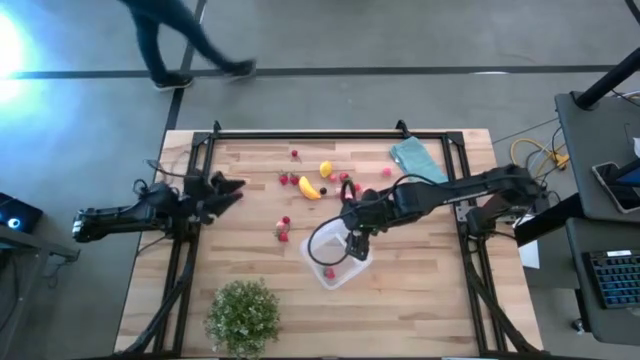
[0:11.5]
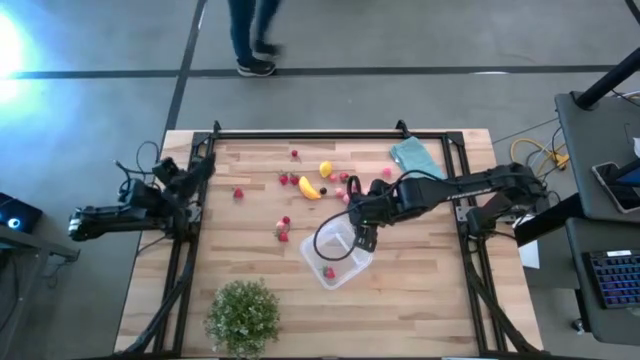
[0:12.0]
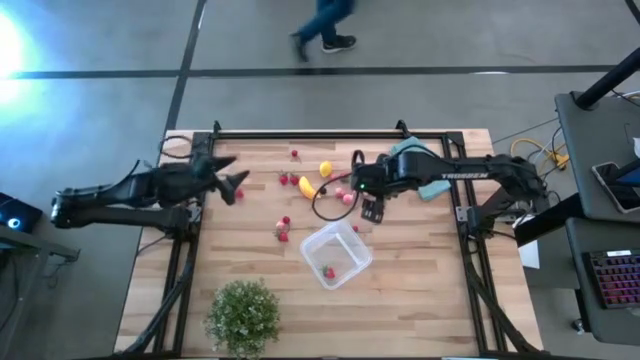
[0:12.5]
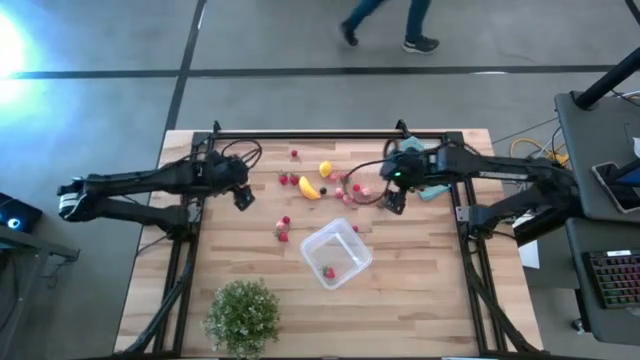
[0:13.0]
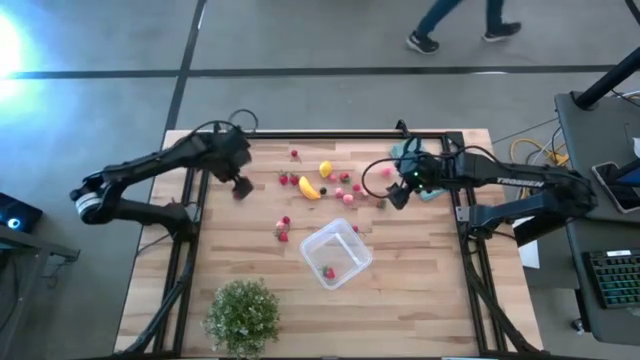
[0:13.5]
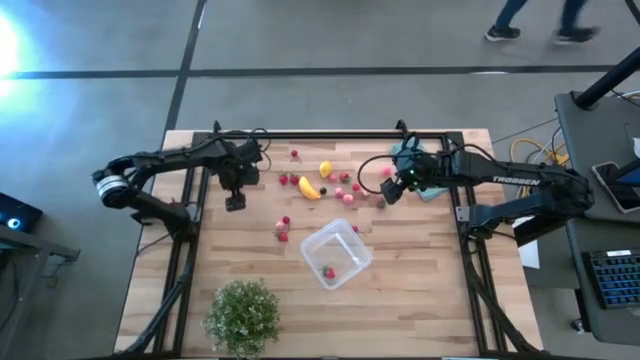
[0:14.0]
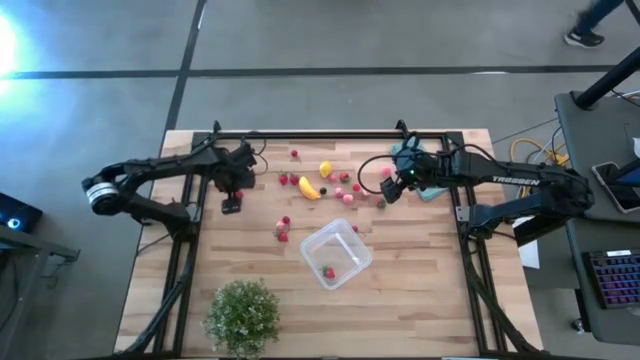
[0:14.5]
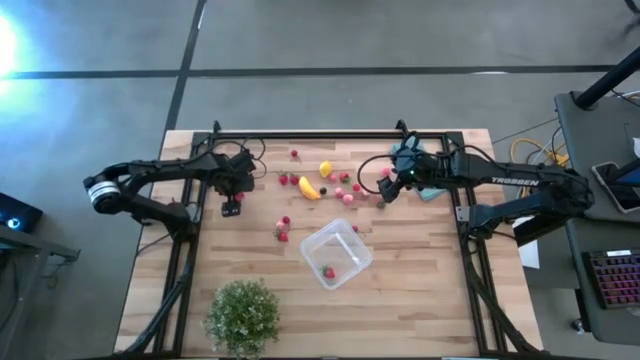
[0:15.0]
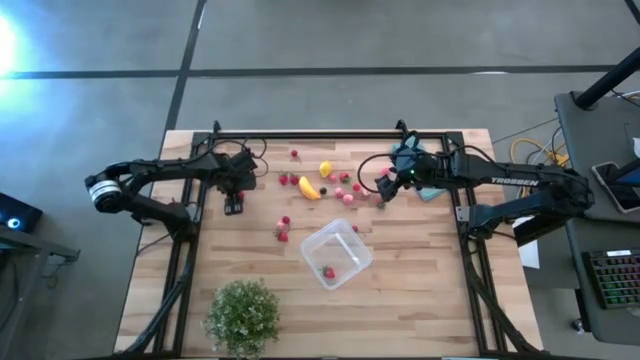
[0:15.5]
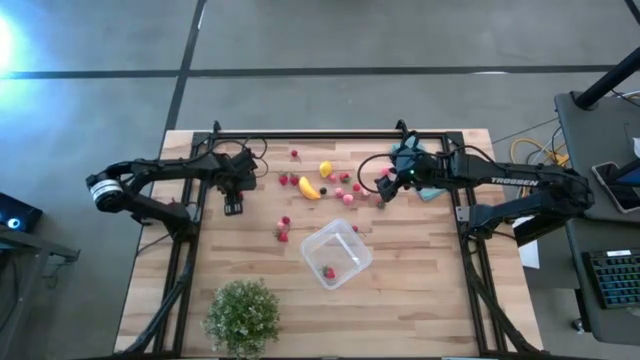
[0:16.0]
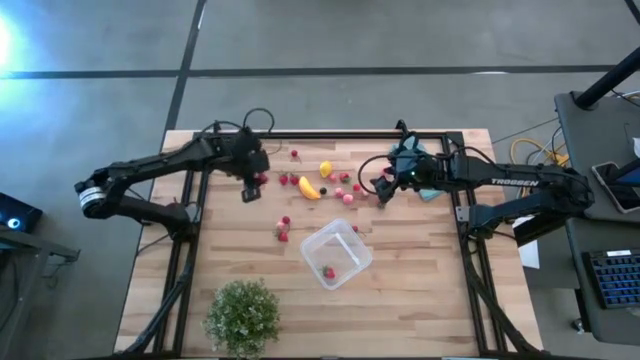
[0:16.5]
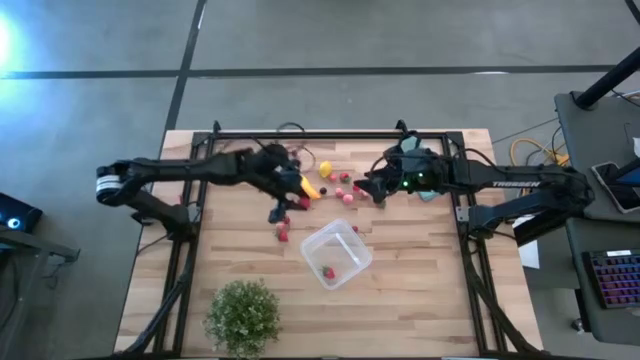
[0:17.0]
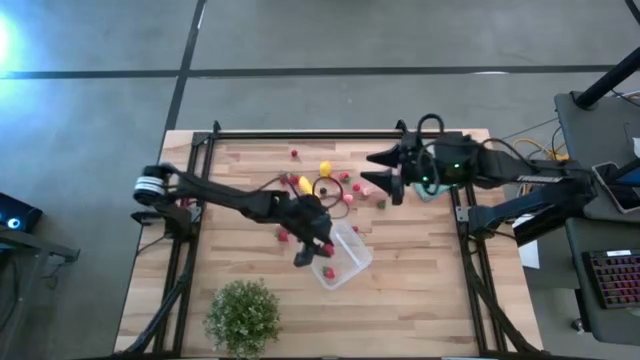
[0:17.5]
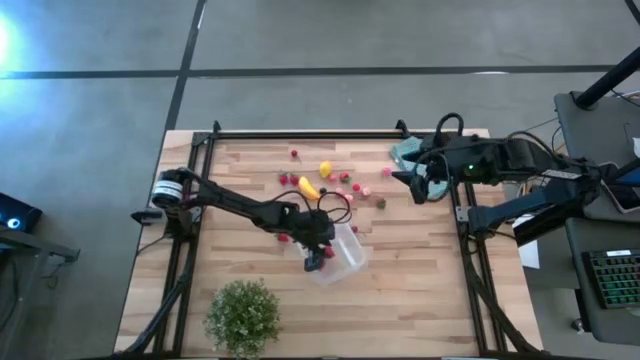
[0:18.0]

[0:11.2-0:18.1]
Task: Pick and placing Produce into tupperware
Put the strawberry into the transparent bin

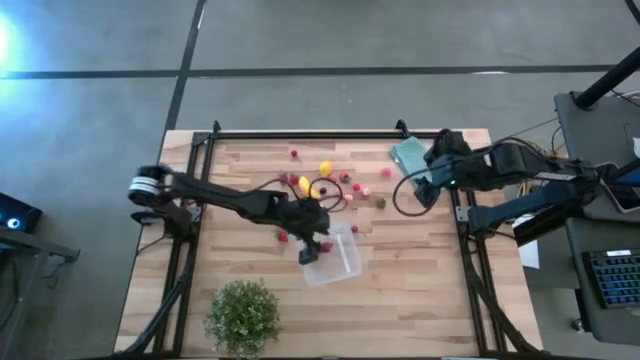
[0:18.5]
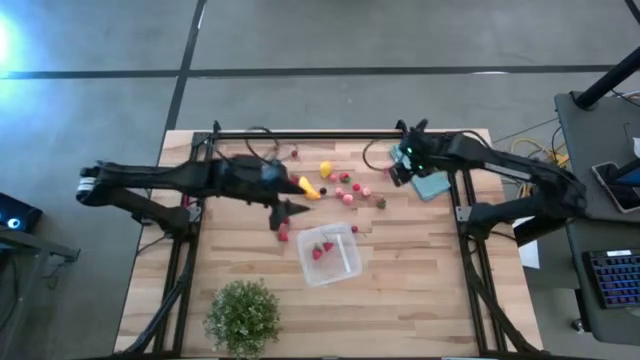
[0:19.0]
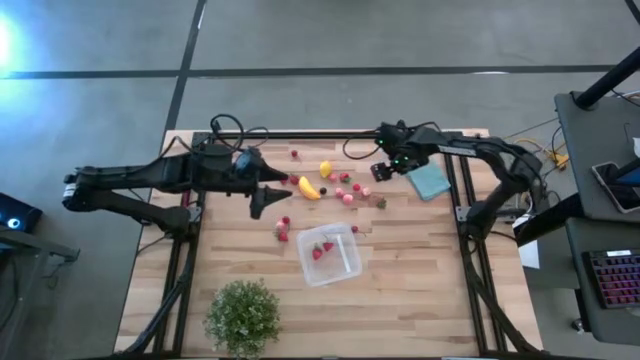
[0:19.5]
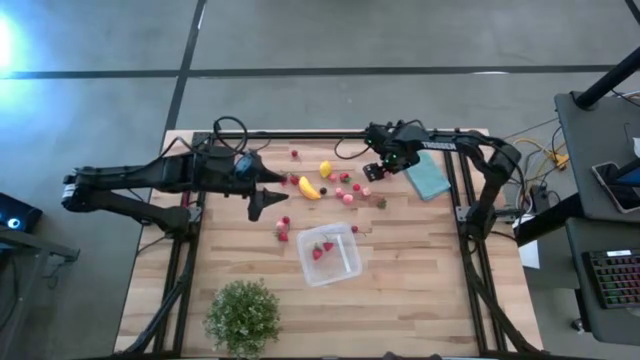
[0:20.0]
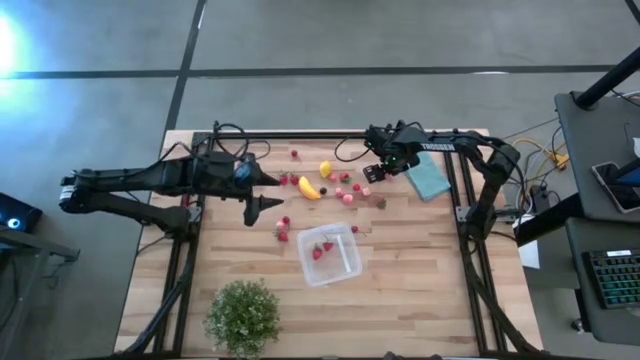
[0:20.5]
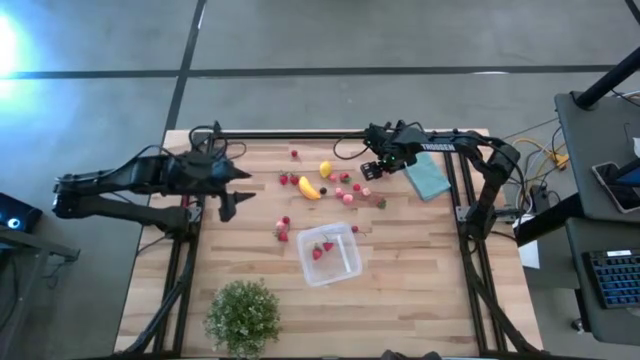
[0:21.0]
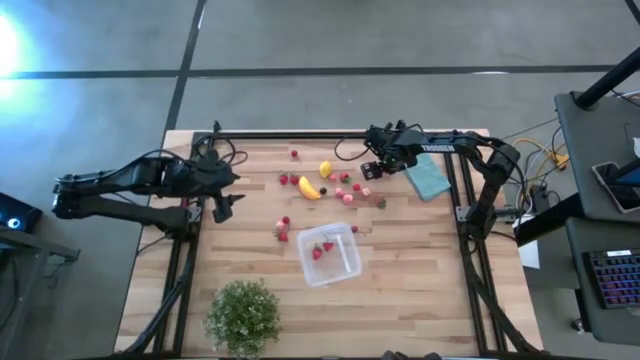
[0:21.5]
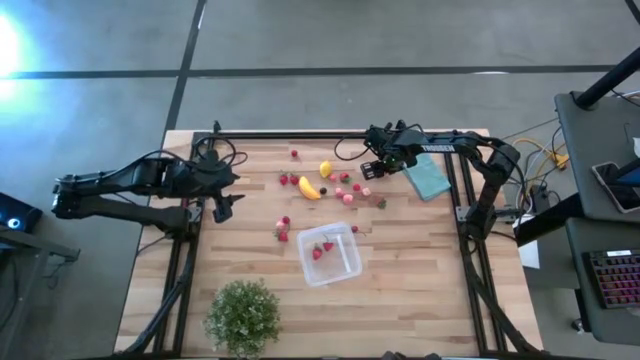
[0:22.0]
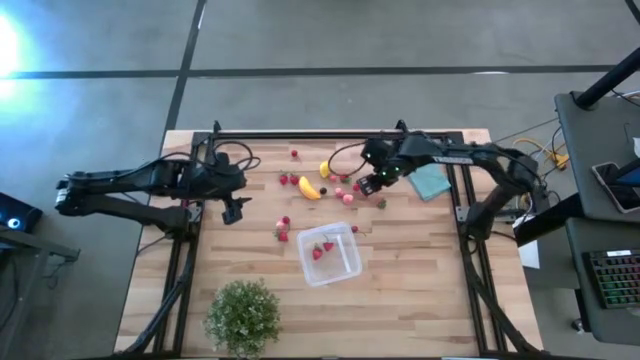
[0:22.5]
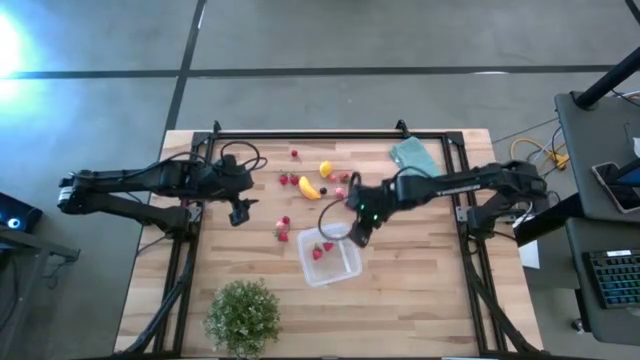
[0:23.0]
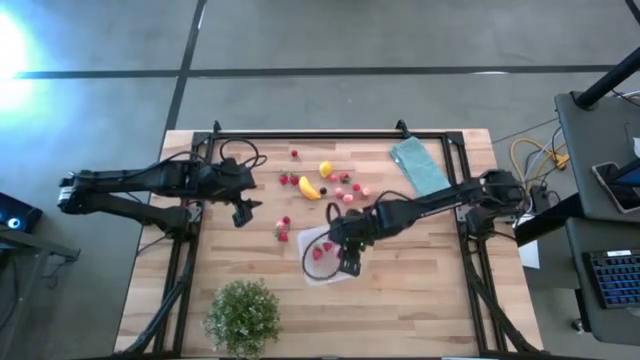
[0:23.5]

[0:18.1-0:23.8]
Put the peach into the transparent bin

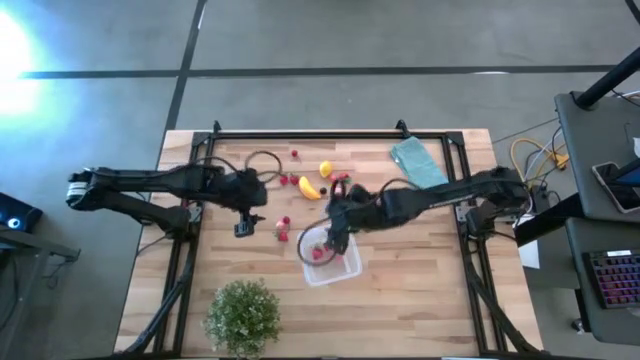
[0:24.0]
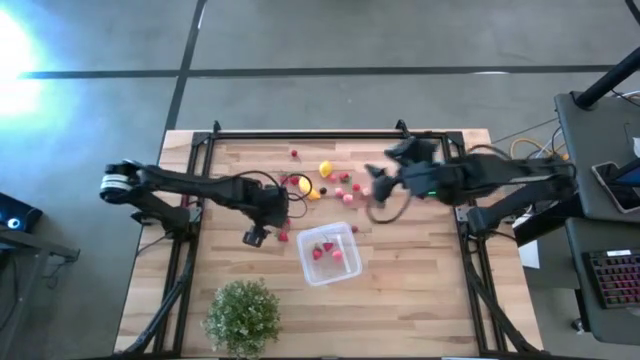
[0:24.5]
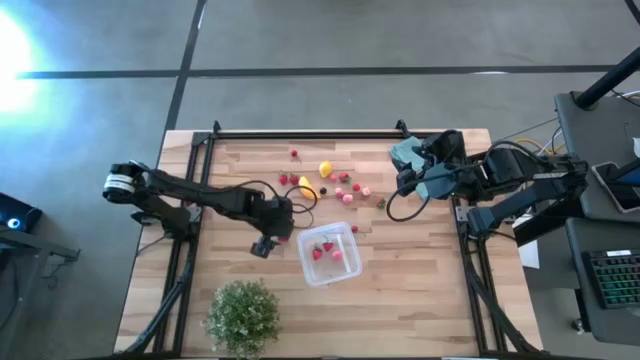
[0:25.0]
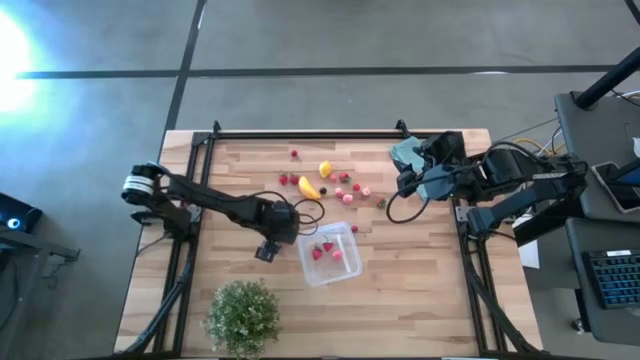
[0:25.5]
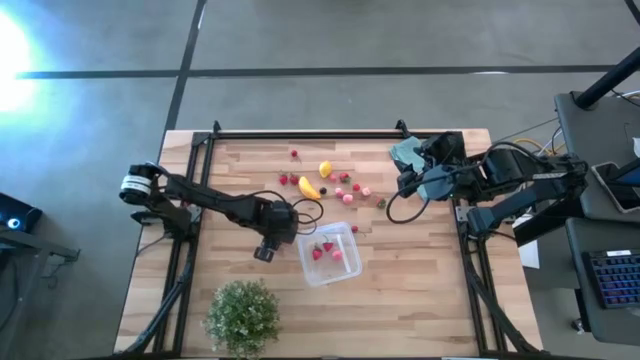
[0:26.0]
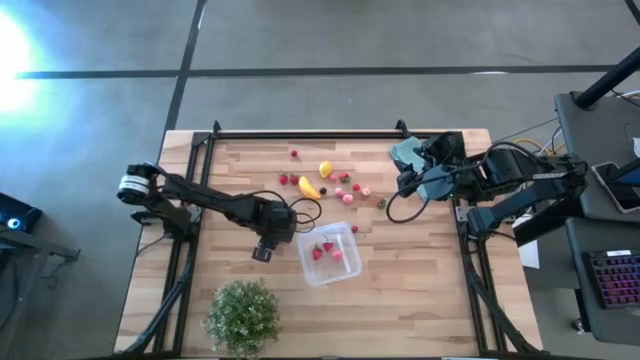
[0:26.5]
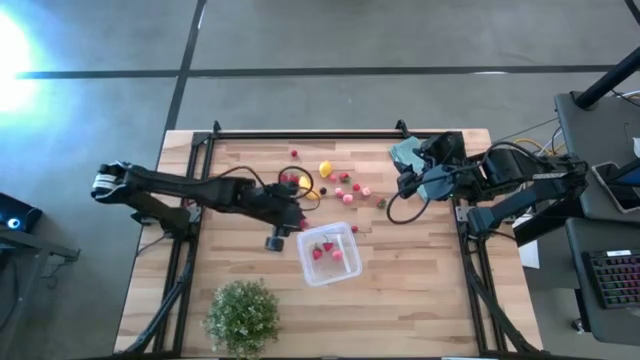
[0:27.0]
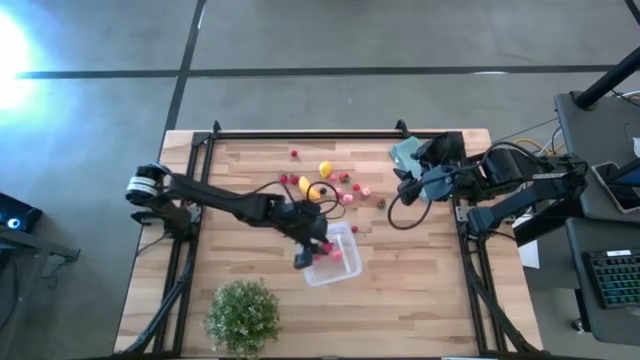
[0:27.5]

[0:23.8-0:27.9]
Put the strawberry into the transparent bin

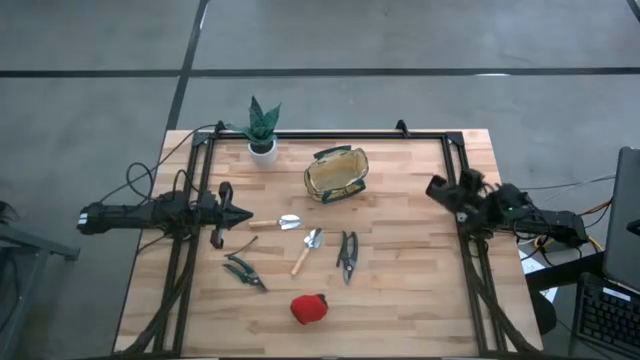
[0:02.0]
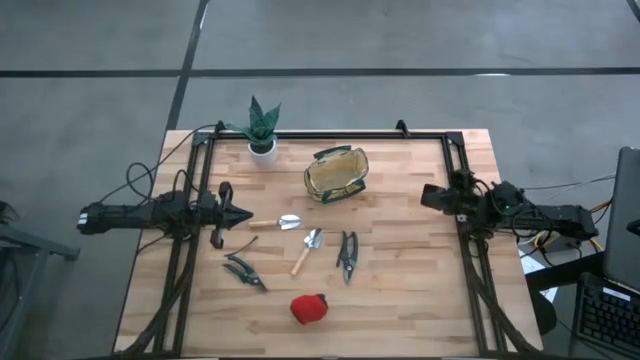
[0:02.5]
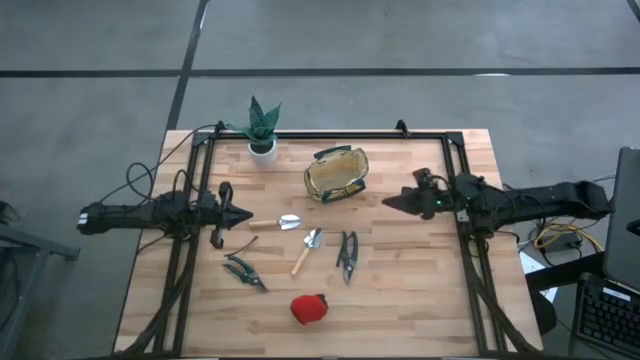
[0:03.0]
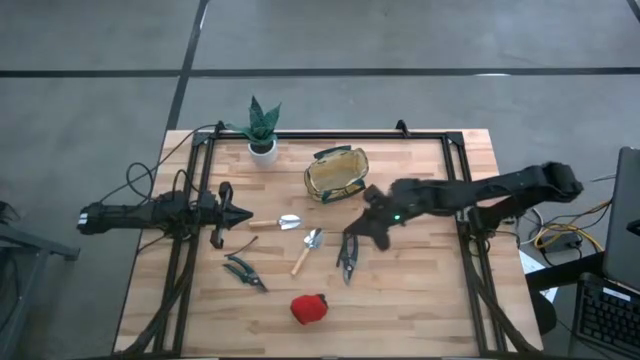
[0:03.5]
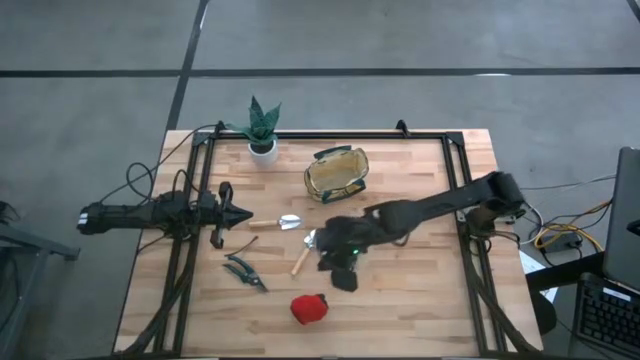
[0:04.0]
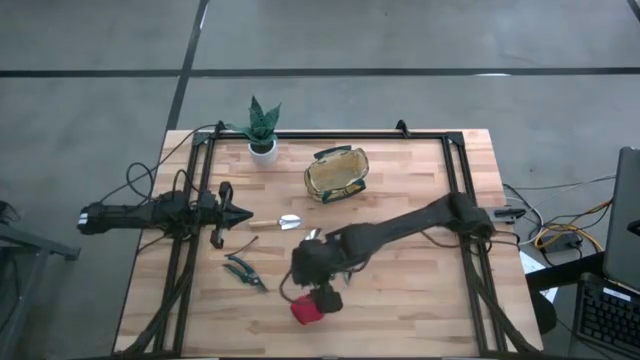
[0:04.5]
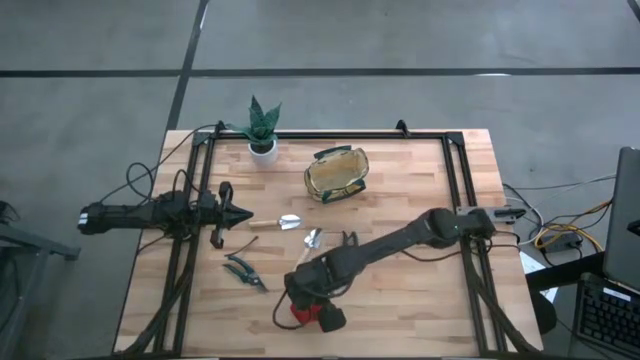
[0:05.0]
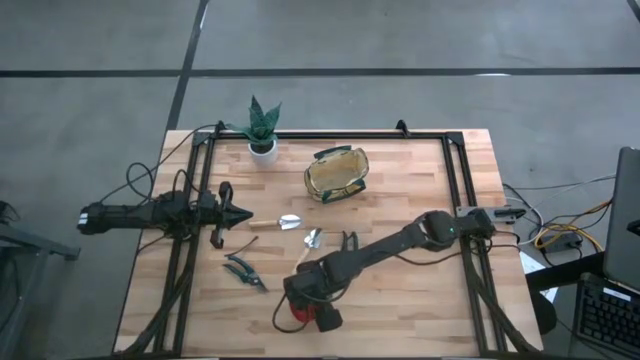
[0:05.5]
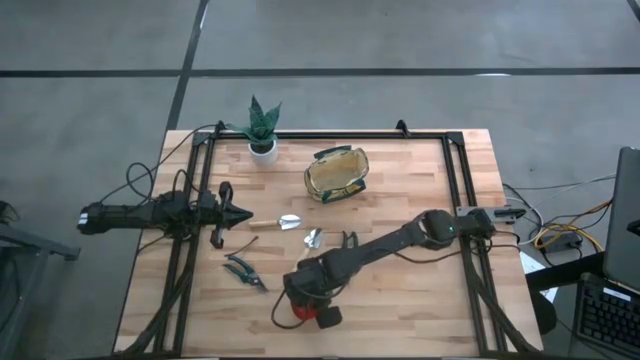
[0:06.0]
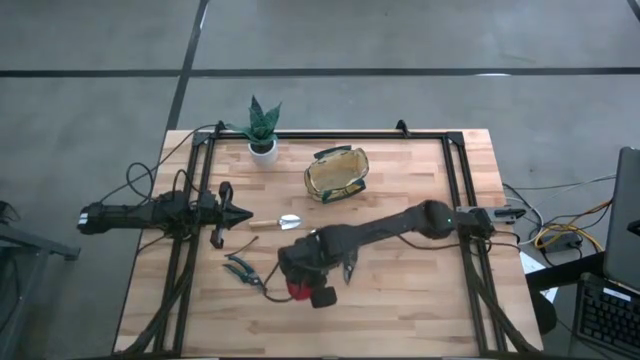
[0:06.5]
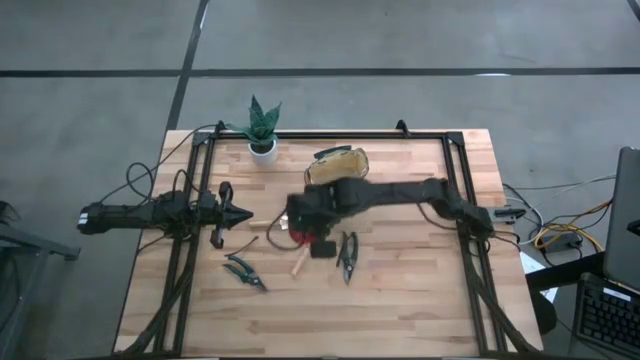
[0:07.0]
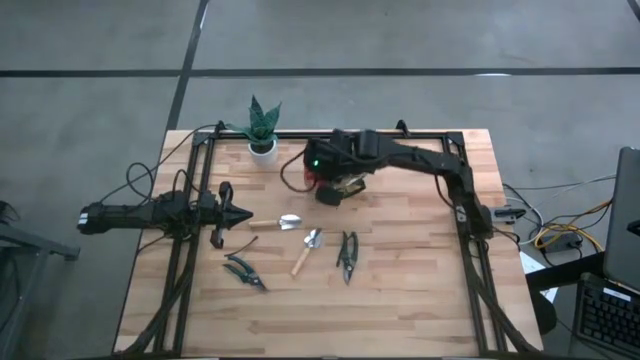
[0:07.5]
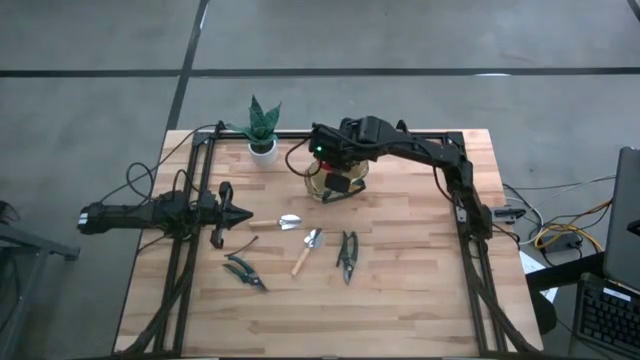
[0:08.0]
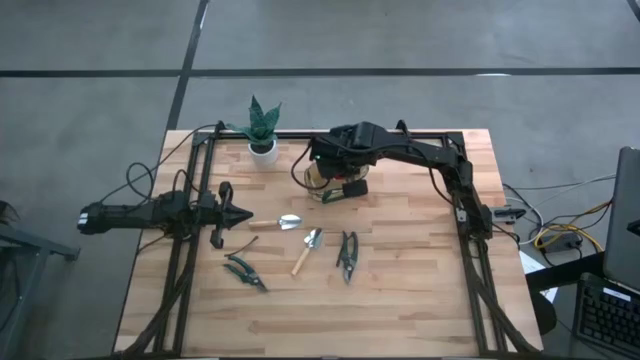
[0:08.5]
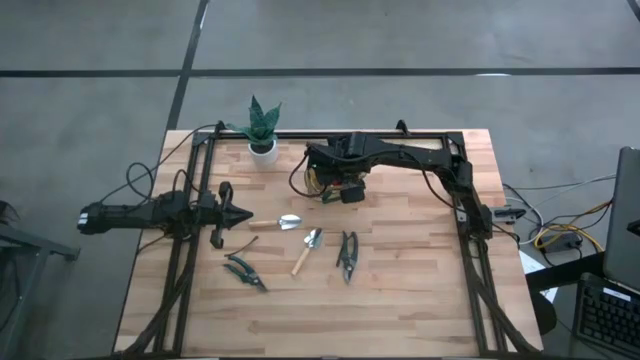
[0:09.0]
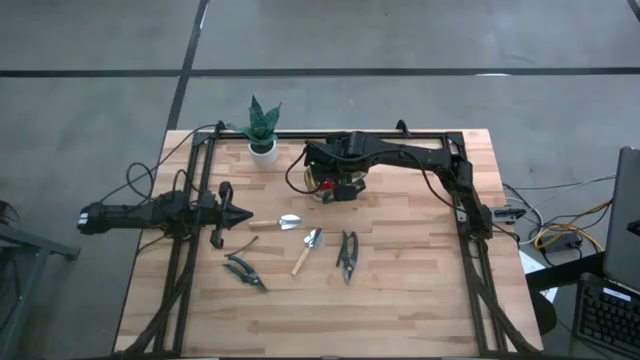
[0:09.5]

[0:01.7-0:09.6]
Task: Pick & Place Garden tools in Gardening bag
Put the red gloves into the white bag
